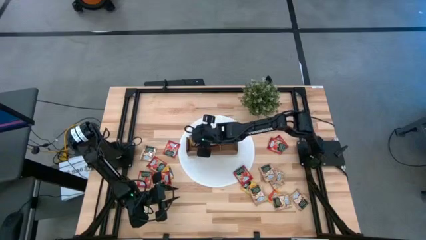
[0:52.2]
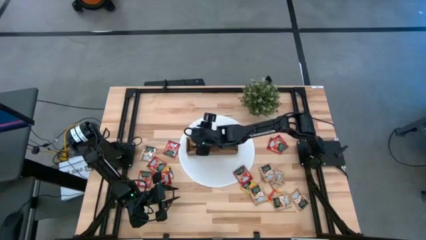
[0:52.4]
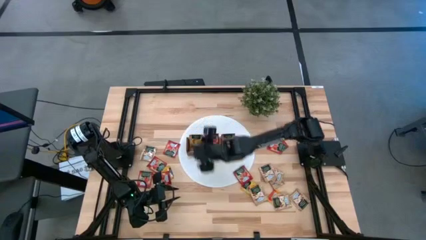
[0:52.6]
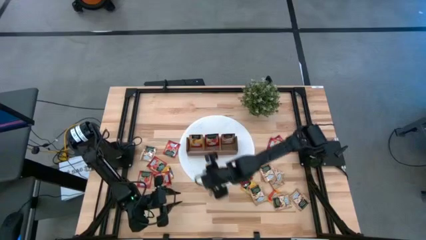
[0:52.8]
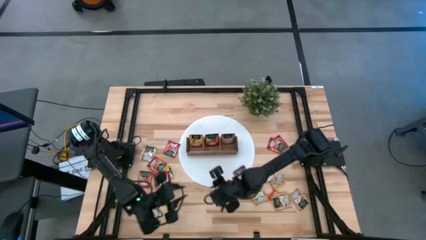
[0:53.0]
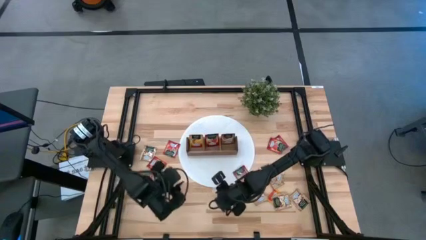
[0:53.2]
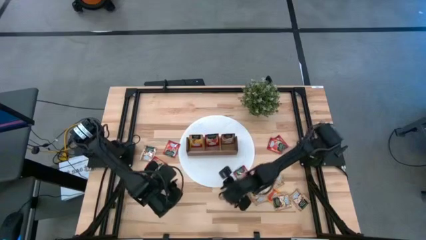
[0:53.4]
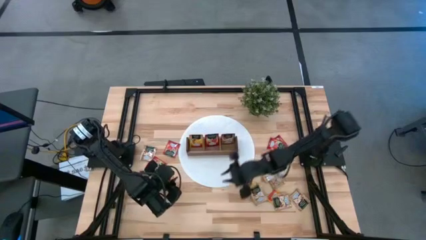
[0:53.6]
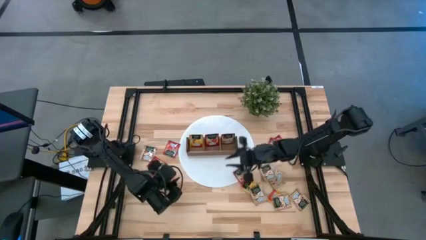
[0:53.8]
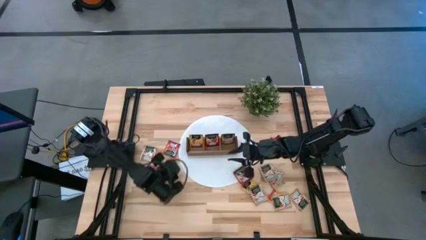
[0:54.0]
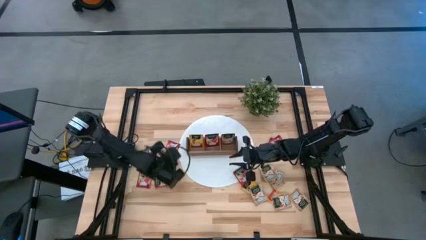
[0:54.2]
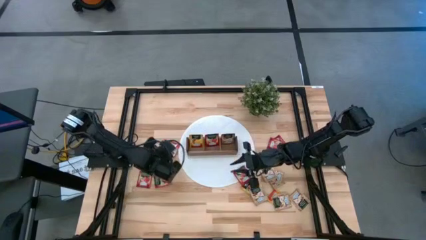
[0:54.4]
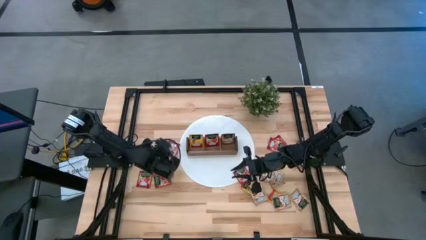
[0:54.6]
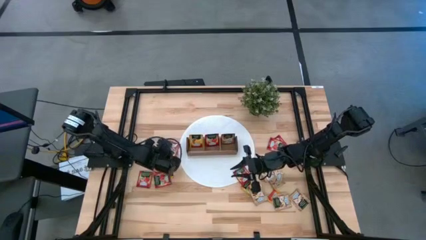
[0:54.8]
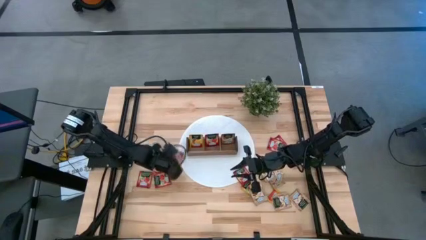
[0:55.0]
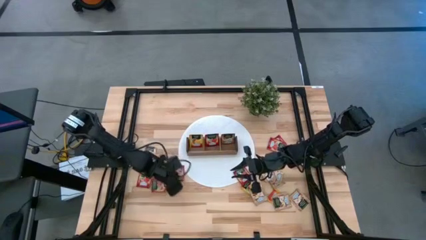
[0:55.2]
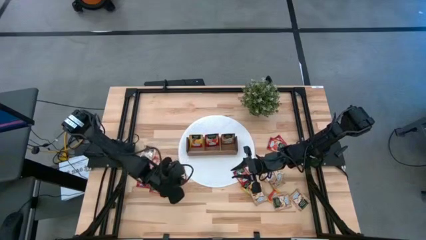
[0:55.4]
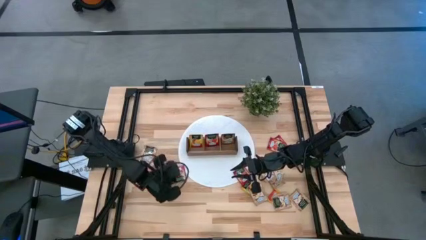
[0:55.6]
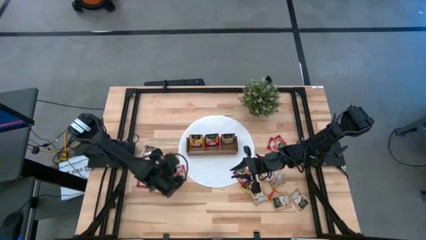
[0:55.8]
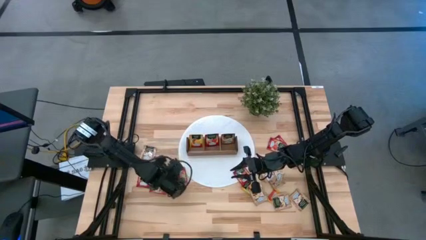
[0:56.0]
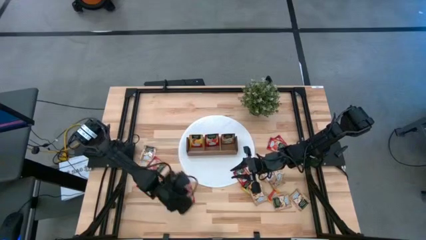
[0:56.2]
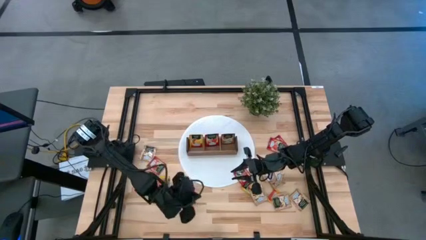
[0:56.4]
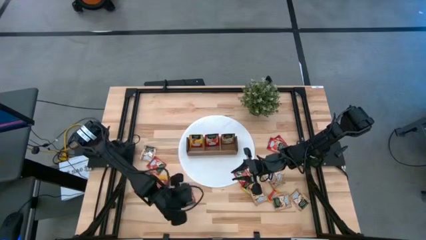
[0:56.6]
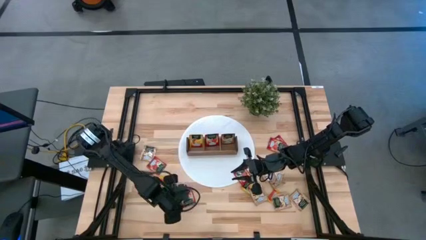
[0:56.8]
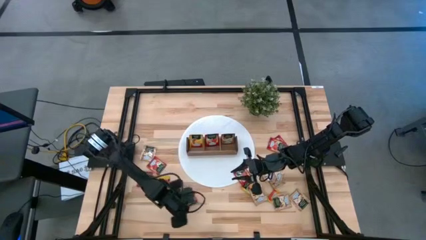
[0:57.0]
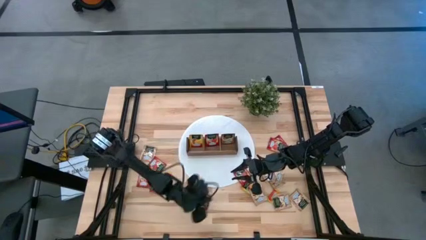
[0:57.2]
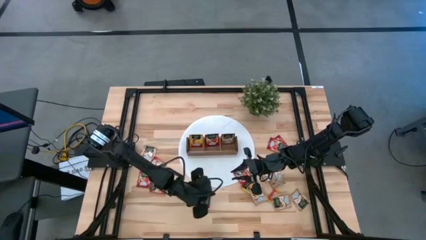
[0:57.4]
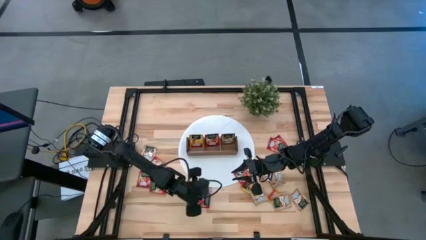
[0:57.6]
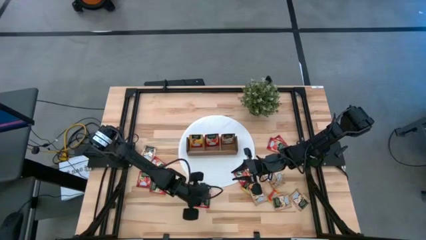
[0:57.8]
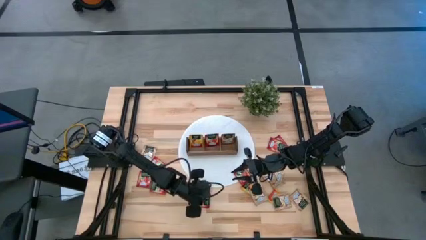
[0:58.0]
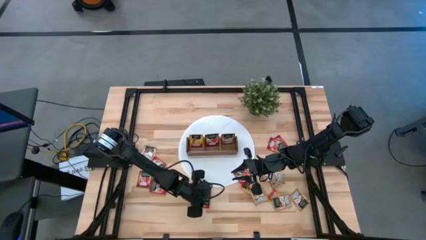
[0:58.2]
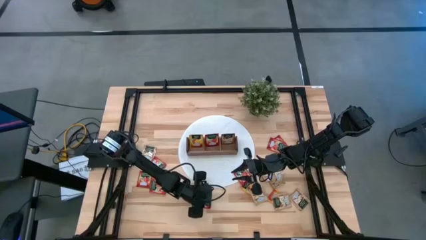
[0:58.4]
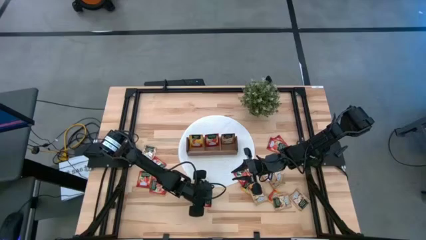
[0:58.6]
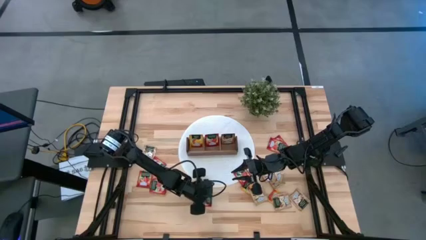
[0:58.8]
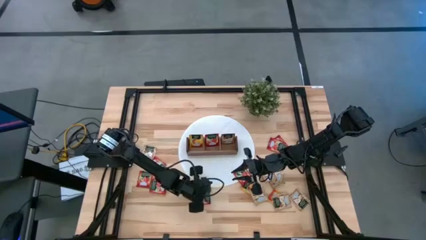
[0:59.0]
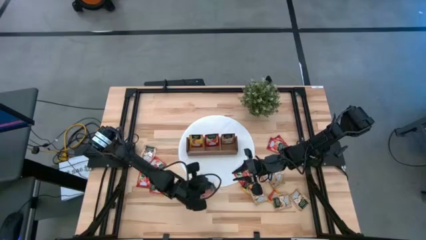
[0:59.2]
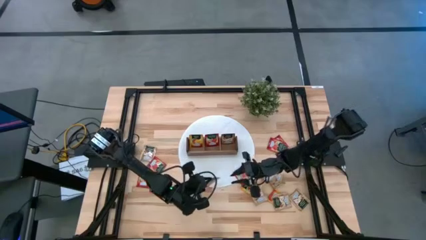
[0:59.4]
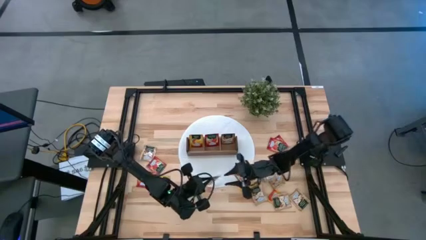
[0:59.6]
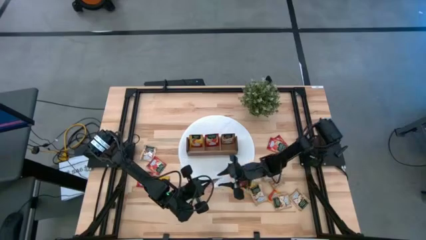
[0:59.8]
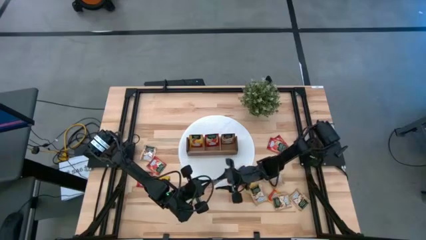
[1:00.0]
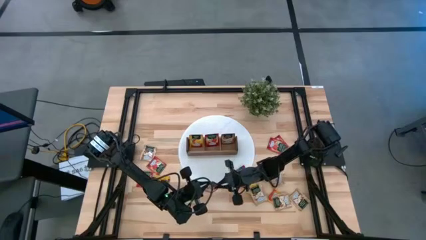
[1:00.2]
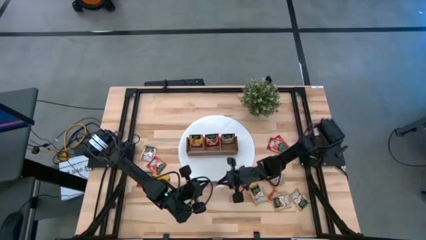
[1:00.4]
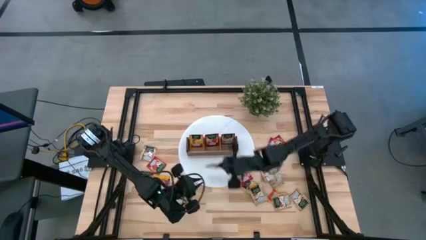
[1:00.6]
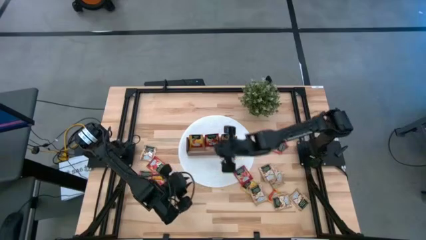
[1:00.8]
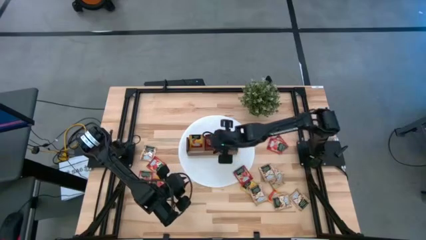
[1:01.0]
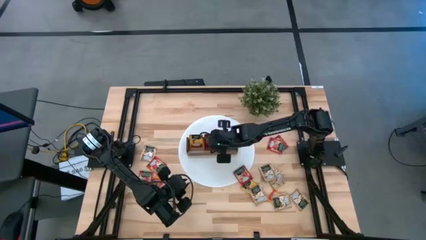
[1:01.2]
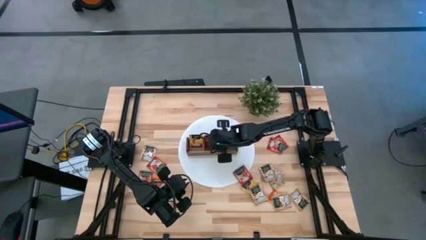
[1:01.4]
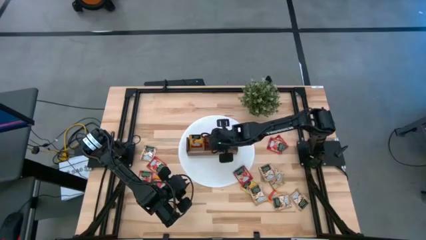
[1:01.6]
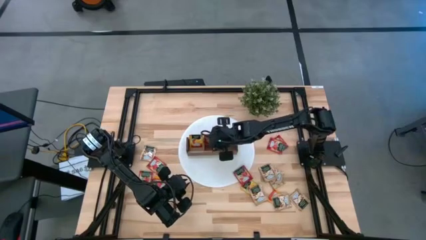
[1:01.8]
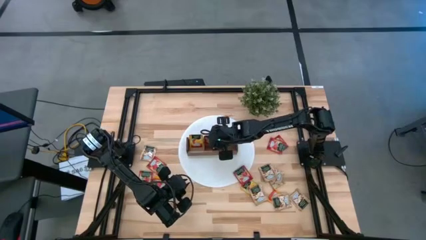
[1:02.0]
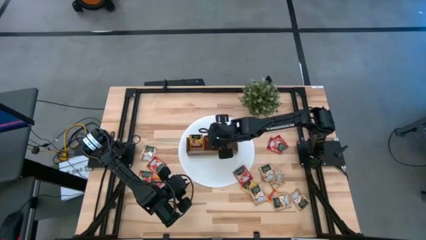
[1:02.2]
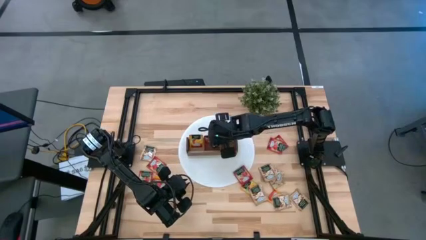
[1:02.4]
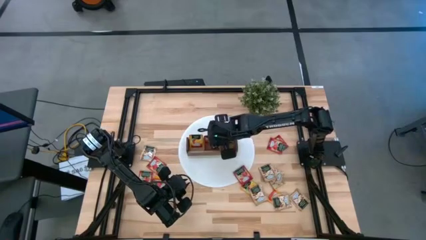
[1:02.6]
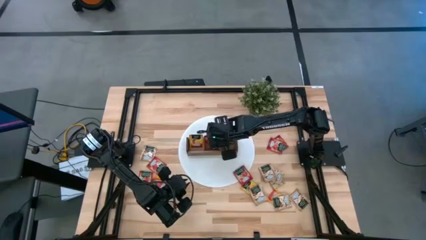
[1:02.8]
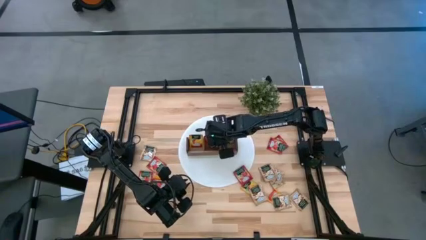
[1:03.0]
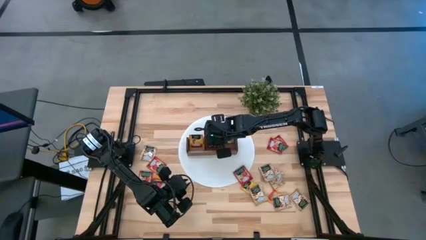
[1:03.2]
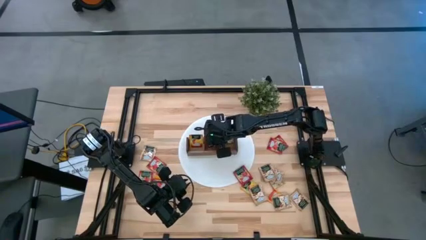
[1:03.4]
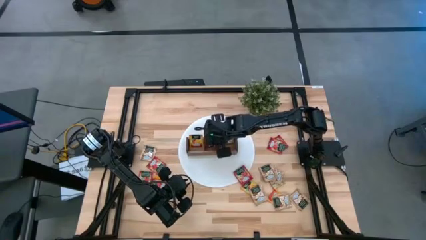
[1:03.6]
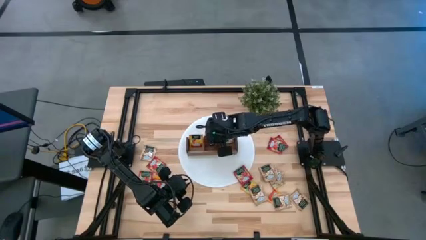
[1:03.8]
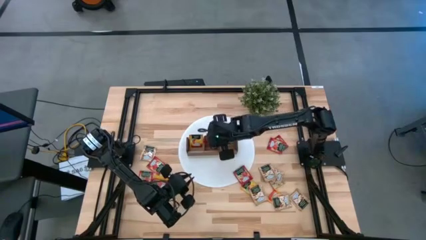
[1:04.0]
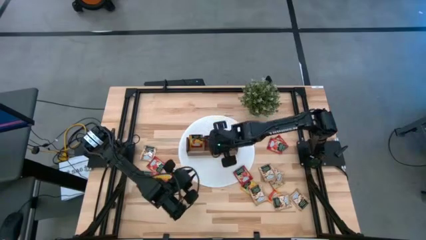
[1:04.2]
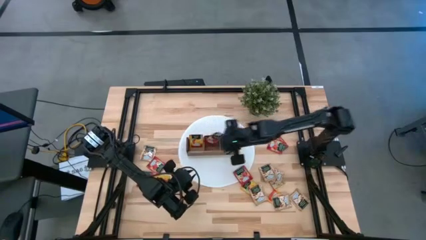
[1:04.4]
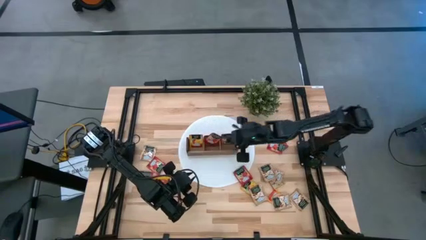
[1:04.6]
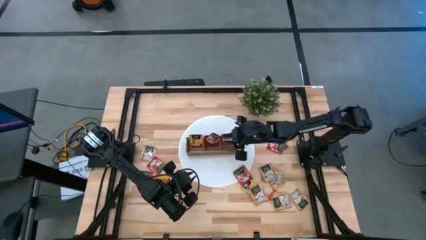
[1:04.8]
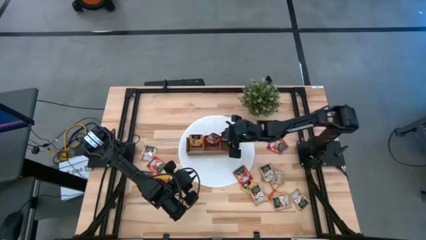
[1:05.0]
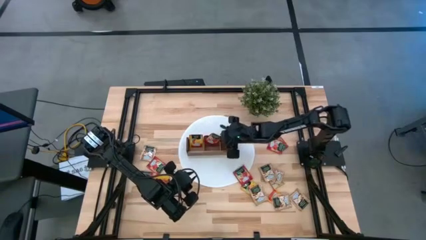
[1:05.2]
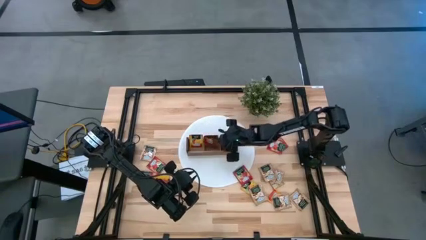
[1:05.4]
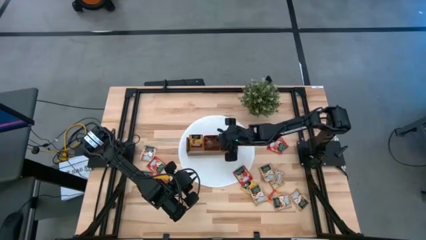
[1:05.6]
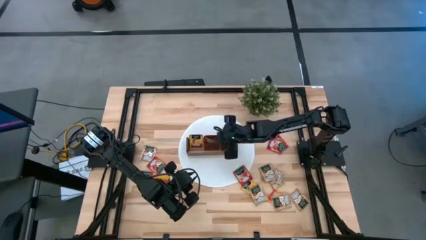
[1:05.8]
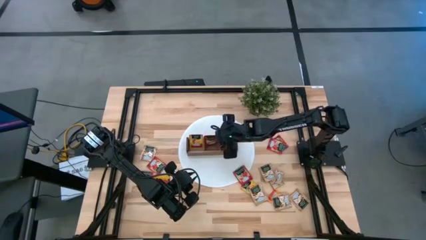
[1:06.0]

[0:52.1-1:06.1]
Task: Pick & Place Tea
Put the red tea bag into the middle section of the wooden organizer
